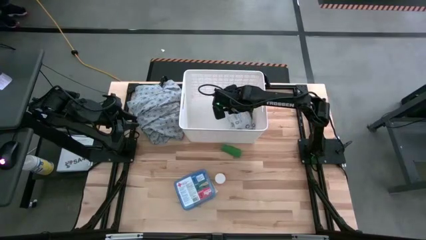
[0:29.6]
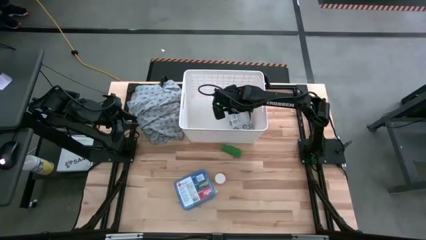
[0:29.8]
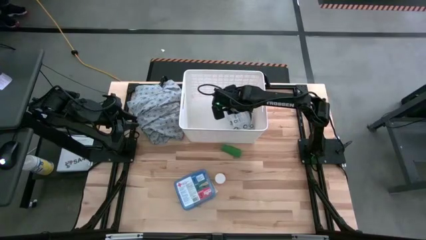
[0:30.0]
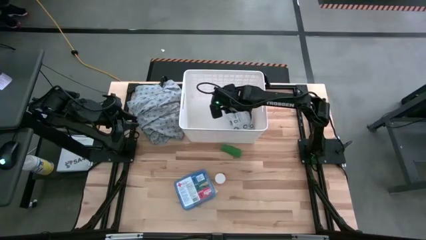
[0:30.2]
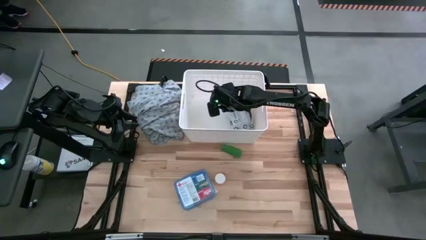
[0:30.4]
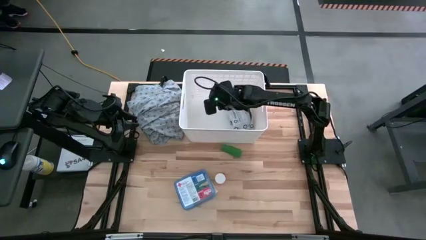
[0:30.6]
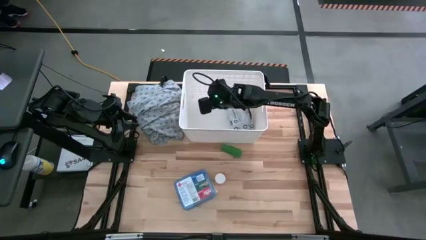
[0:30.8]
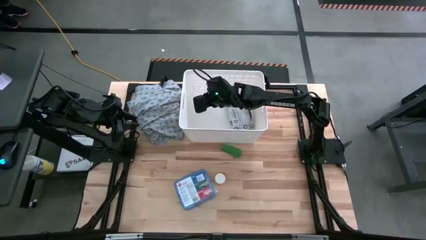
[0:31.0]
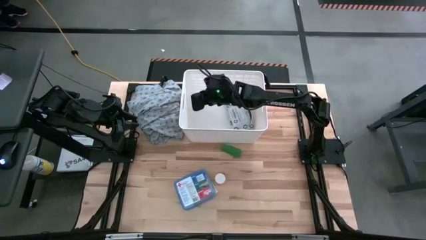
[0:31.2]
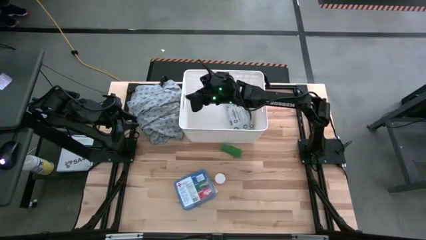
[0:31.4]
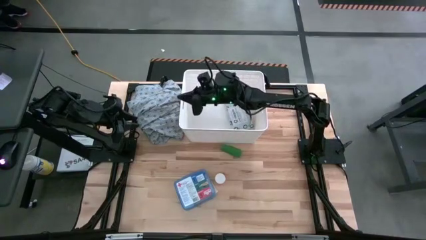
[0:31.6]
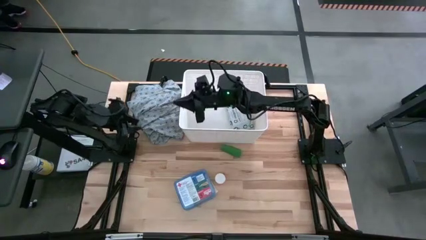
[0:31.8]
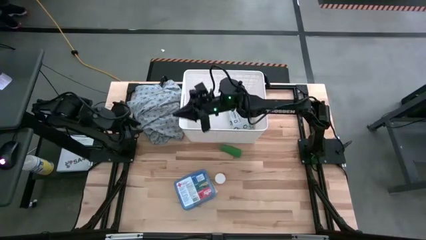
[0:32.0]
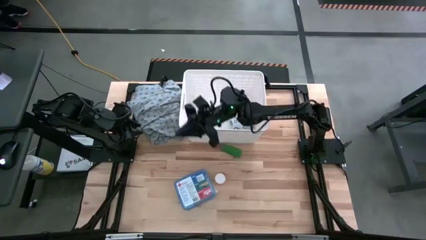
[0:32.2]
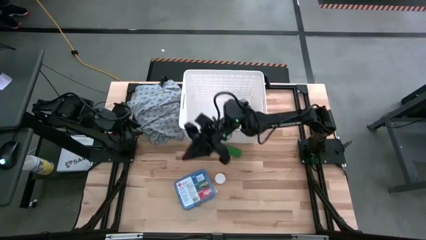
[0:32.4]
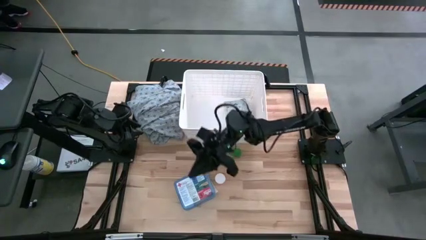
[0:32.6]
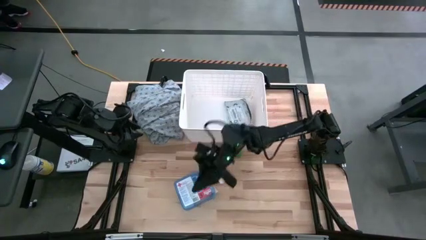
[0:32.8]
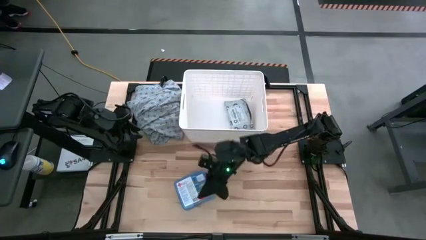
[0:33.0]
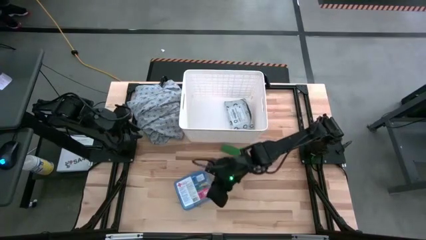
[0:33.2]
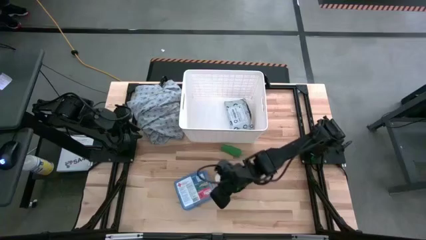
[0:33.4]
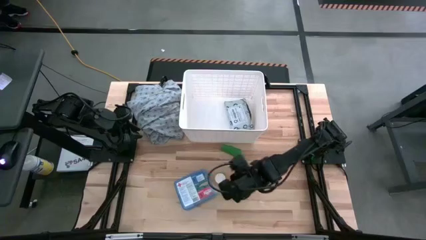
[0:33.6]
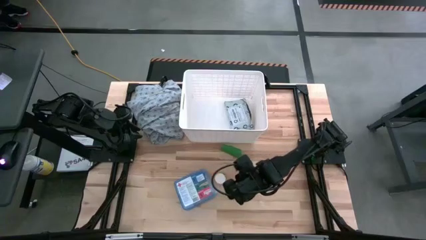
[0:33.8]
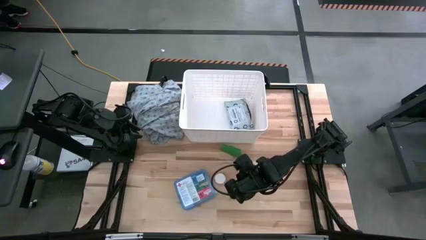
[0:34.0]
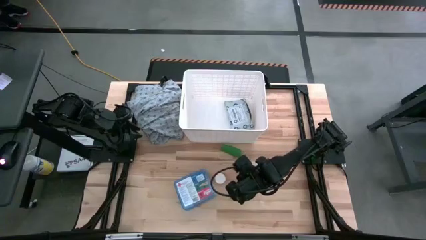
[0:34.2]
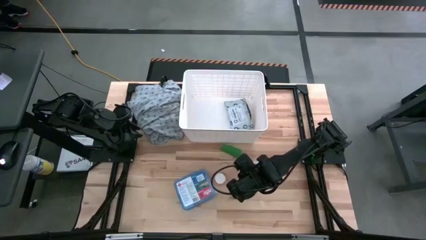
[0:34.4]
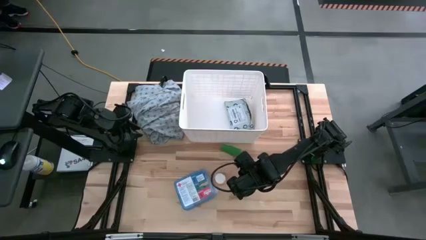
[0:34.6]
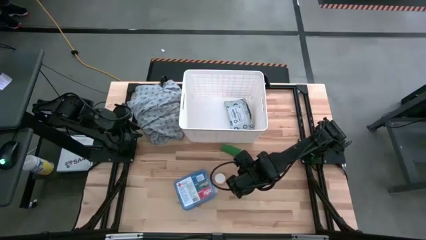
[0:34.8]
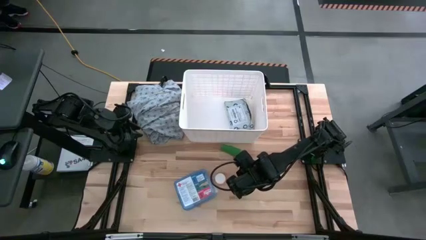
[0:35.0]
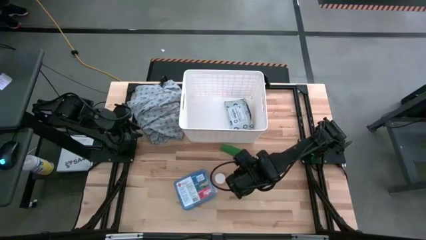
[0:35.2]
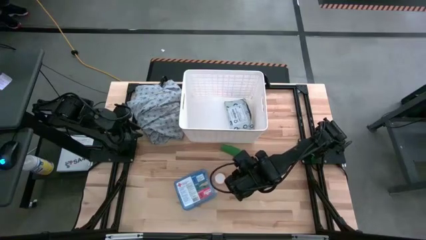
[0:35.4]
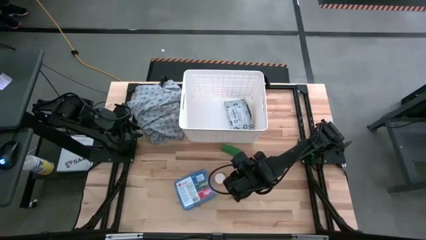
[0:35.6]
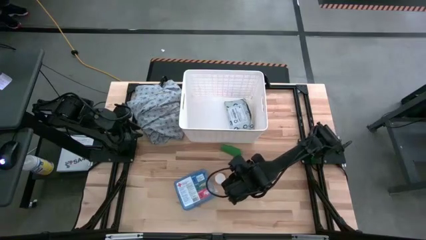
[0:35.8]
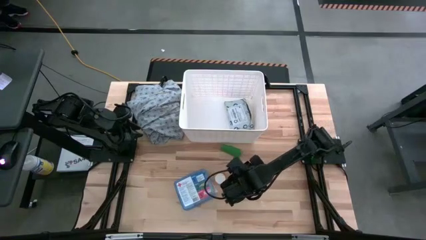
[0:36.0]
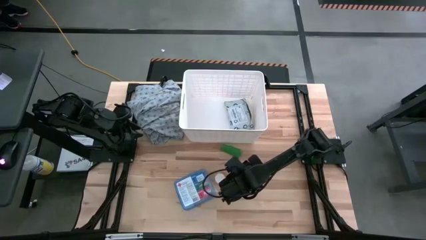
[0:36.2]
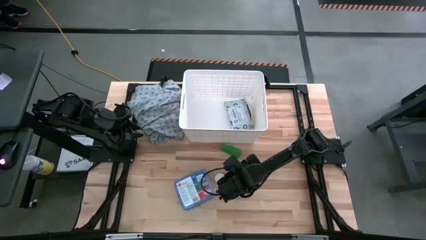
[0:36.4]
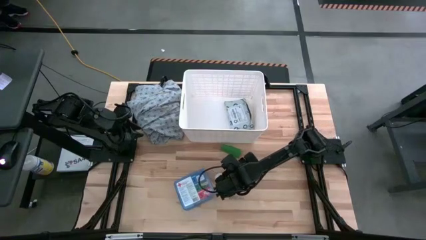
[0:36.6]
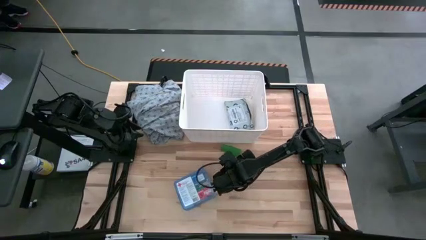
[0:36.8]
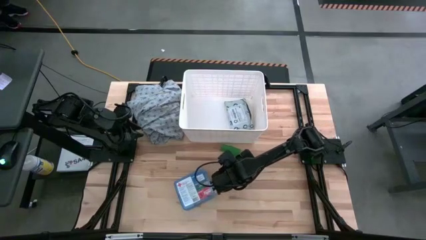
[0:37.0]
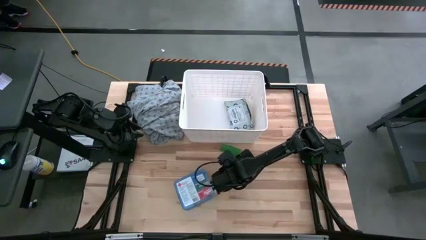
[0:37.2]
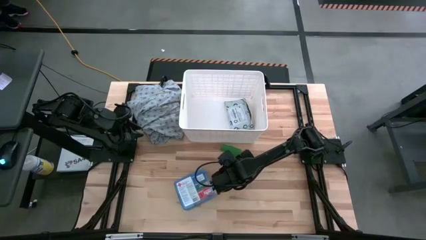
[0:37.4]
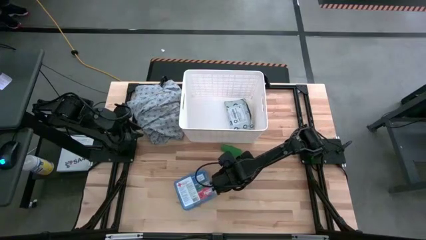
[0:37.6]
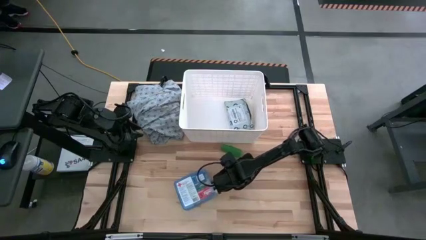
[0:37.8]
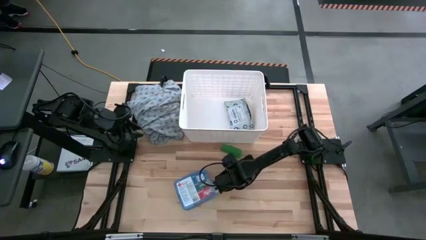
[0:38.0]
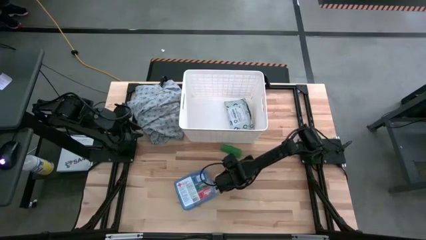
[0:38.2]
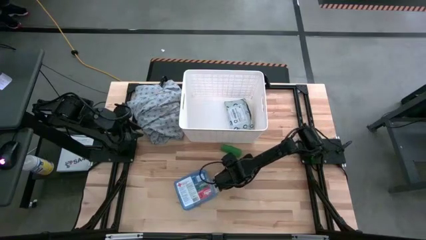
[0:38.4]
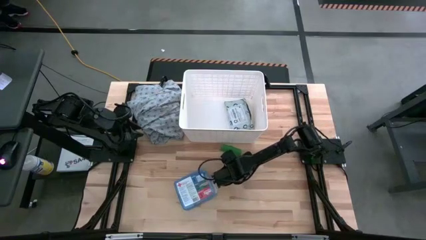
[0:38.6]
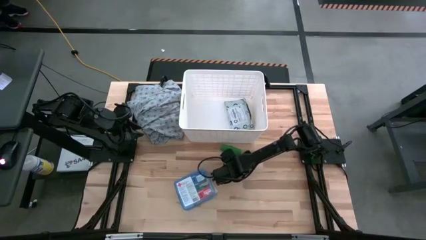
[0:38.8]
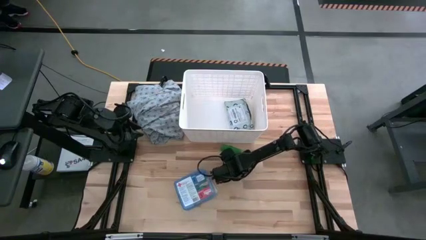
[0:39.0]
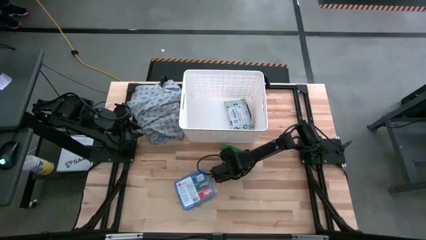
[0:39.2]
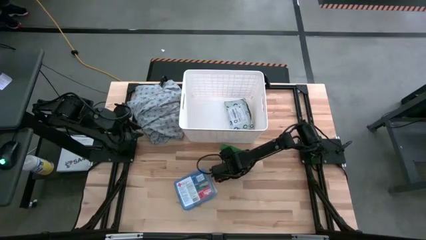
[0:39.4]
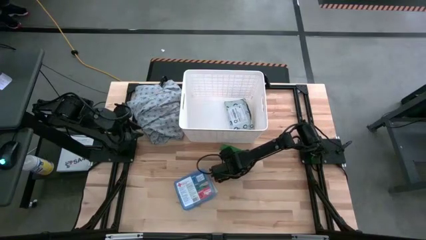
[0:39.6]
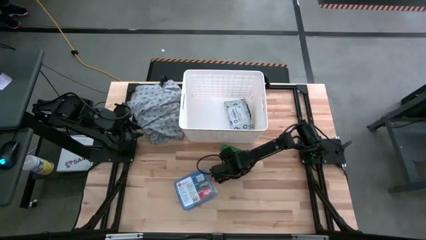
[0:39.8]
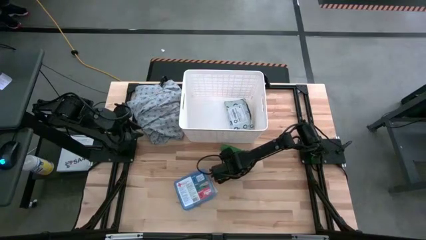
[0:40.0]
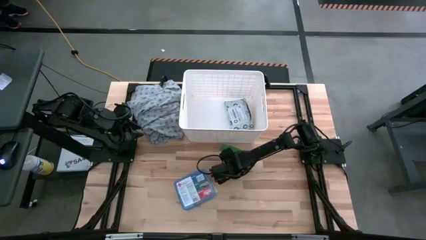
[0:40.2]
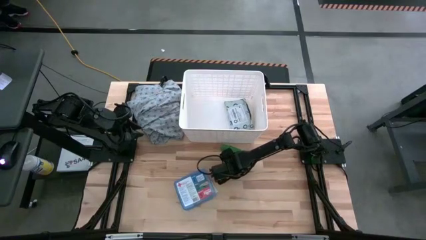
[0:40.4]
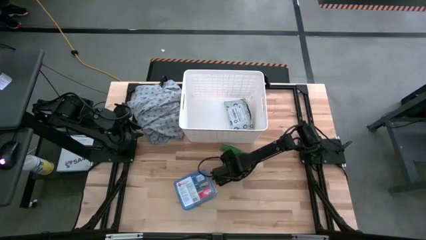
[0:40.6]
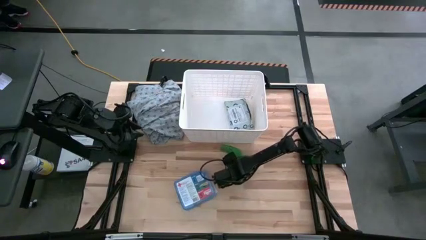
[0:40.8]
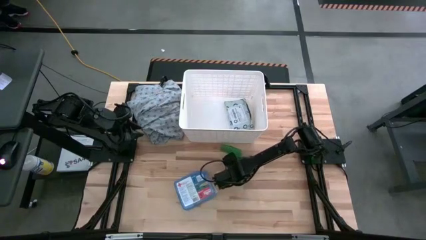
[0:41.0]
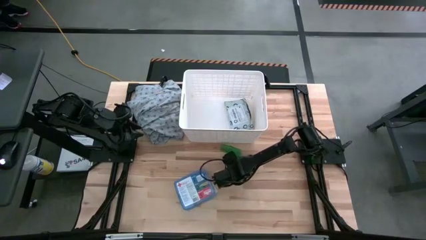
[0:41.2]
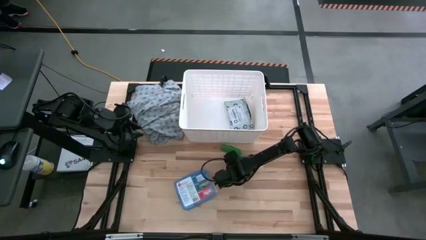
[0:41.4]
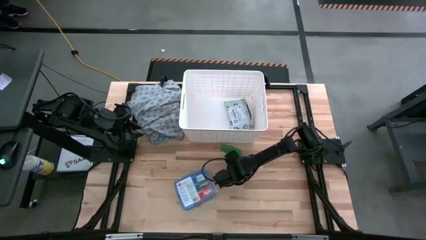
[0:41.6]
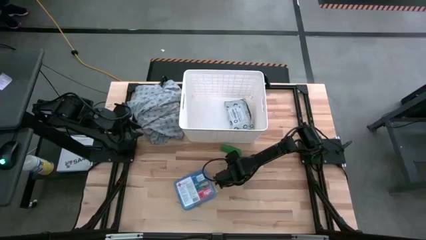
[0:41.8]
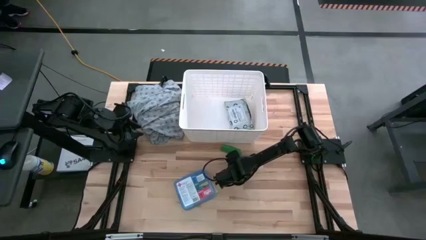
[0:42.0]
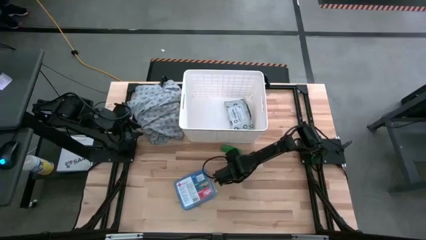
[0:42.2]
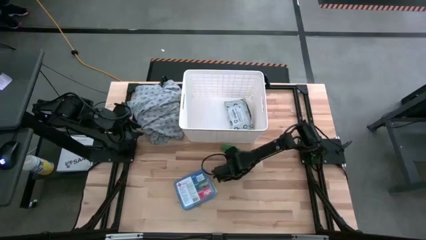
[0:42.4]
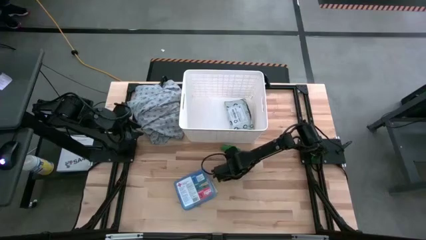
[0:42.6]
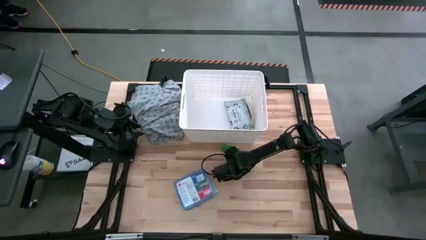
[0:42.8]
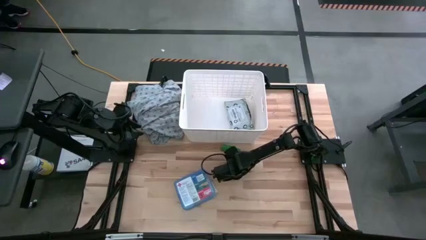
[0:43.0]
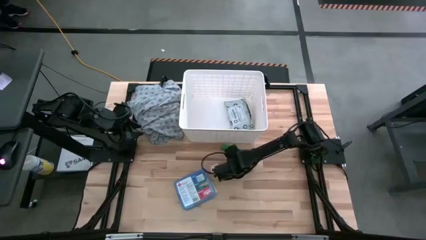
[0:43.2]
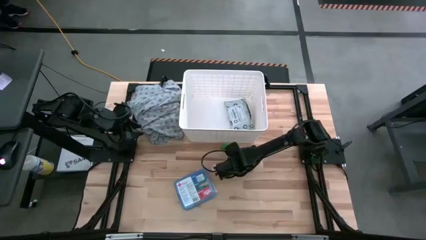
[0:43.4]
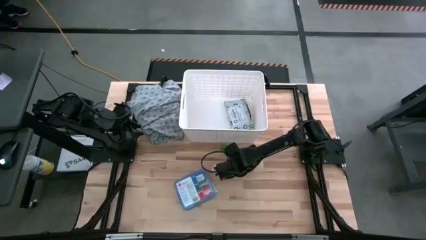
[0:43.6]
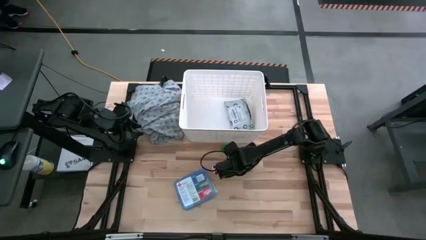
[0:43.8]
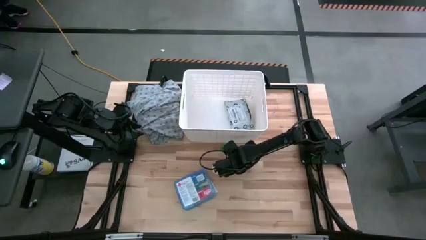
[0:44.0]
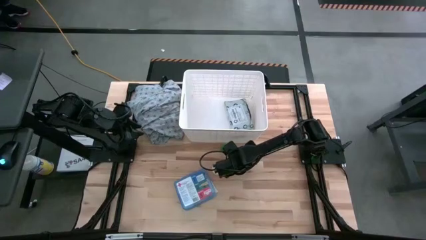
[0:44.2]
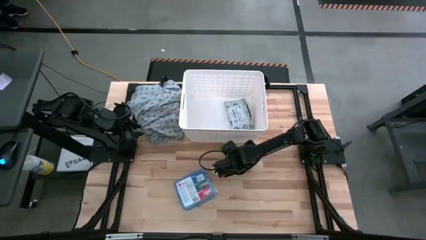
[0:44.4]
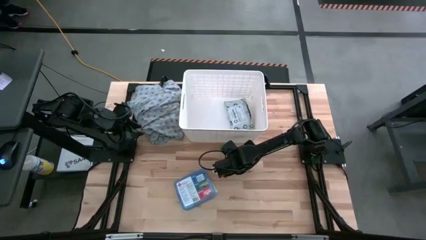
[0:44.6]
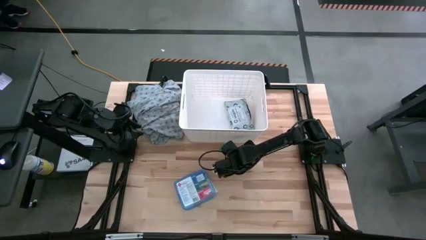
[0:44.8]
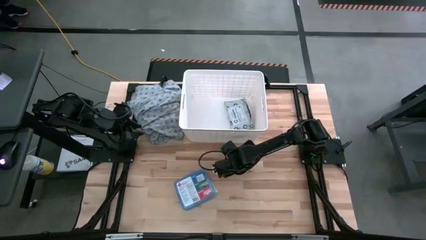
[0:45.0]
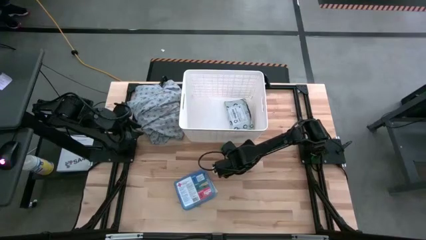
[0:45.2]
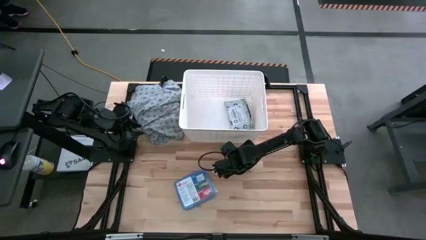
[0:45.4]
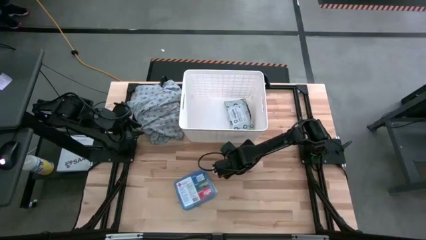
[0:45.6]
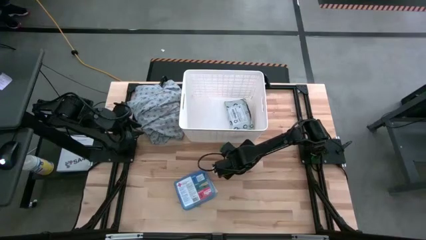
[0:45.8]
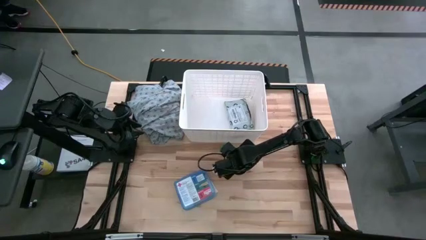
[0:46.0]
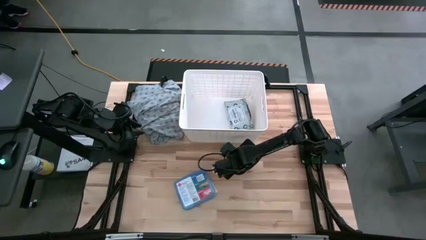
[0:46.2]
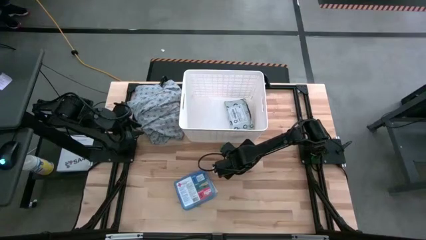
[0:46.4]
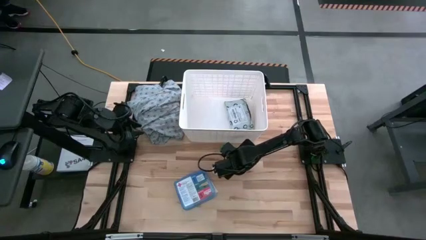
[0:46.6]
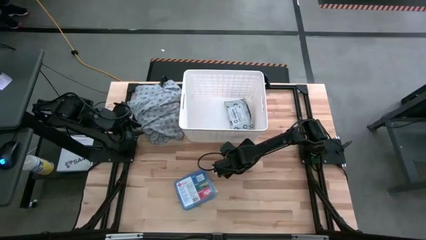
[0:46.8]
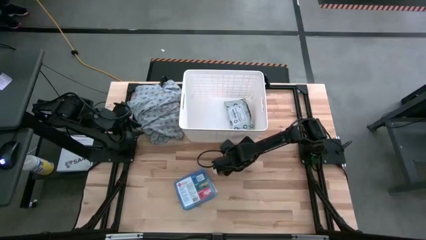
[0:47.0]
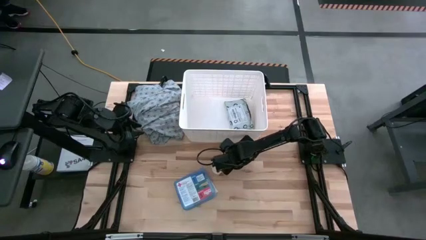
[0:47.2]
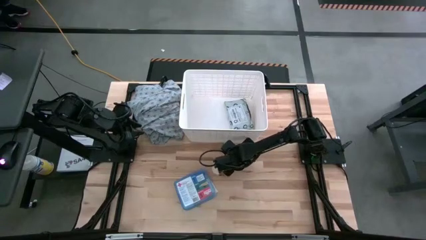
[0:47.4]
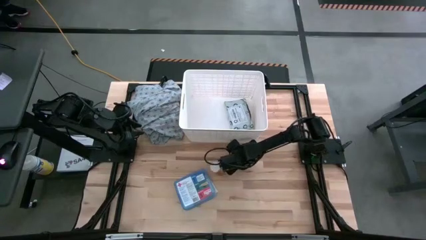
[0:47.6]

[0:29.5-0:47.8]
Task: Pick & place medical supplies in basket/bin
Put the rolled green bandage into the white bin
